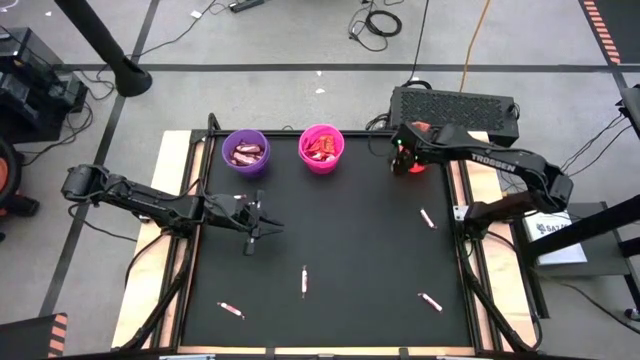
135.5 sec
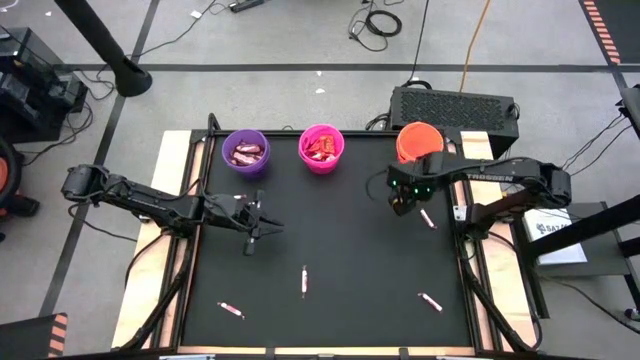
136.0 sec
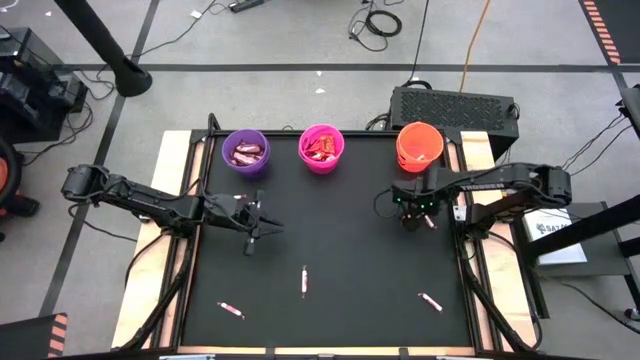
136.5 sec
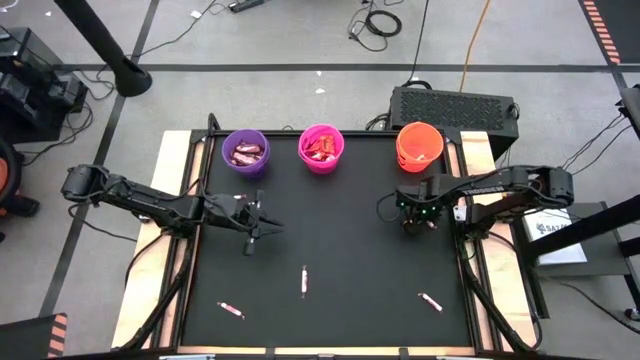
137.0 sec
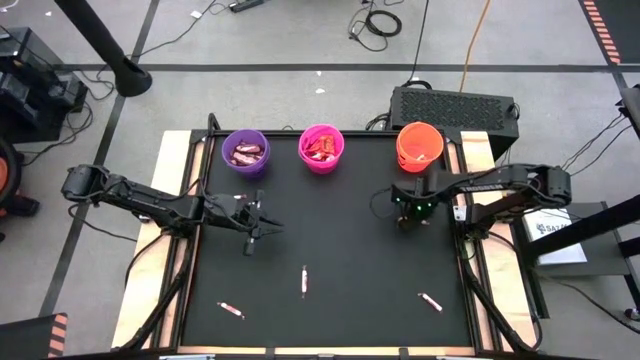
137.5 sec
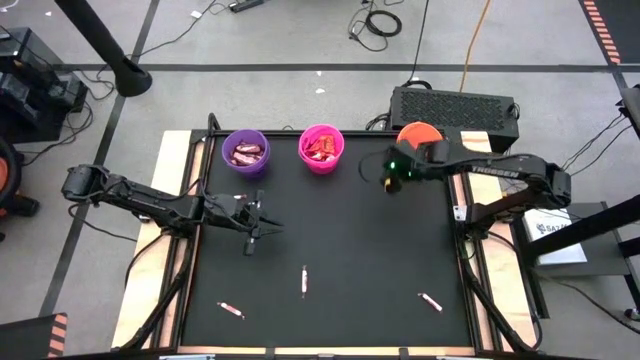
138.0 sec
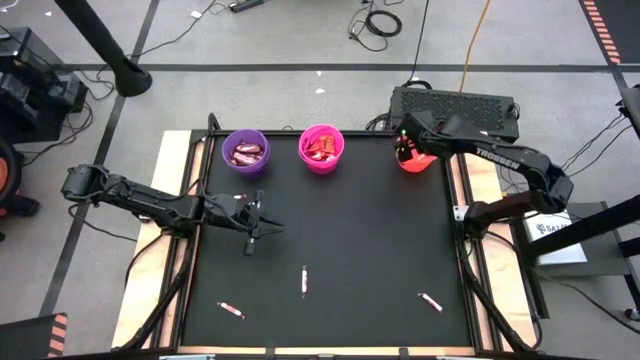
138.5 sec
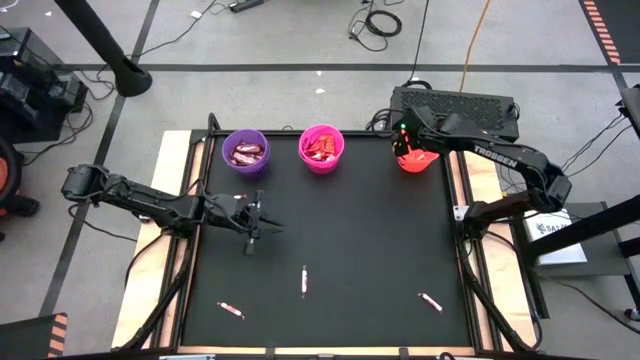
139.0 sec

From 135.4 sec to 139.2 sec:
Task: Sort candy by brand, put in halloween buckets
Put the white candy into the orange bucket

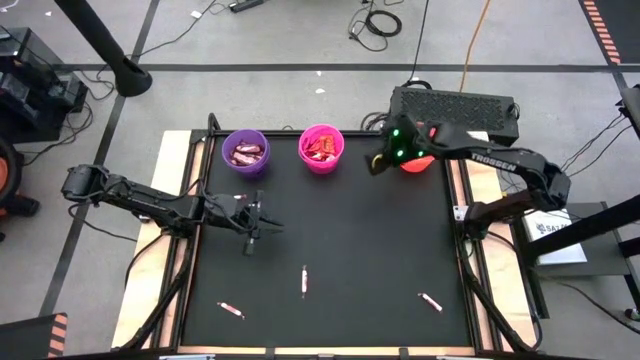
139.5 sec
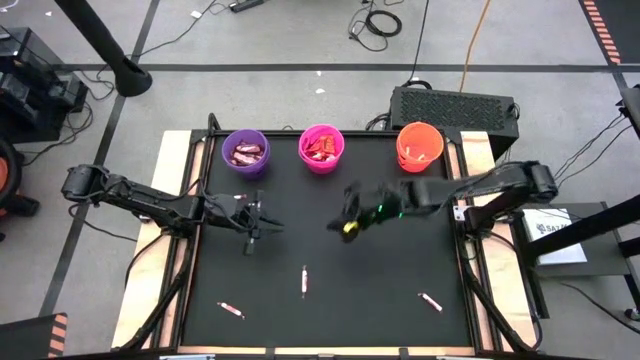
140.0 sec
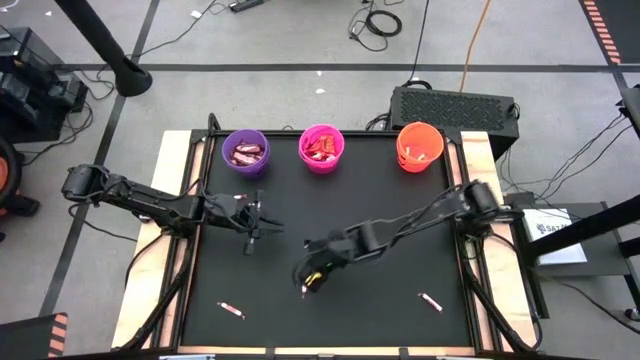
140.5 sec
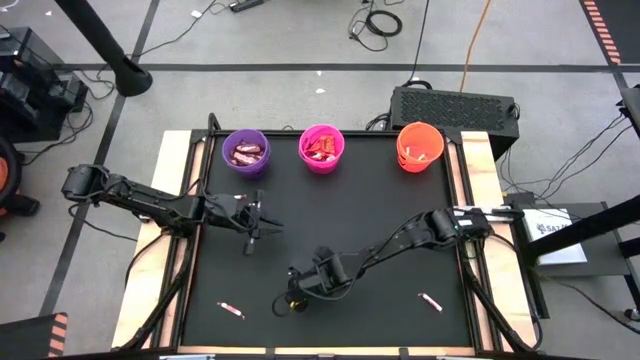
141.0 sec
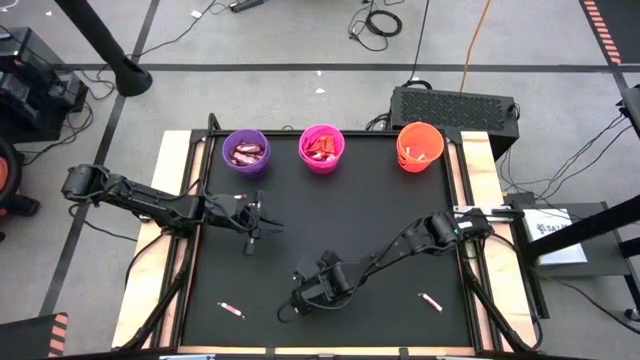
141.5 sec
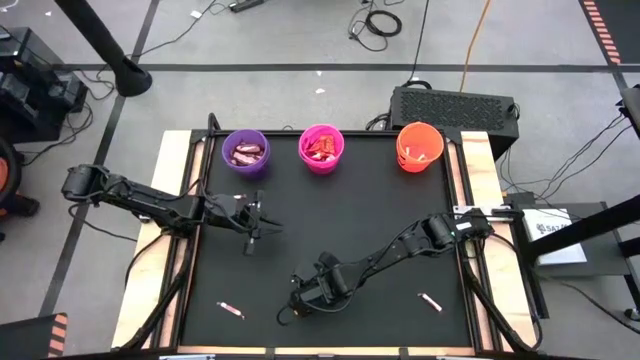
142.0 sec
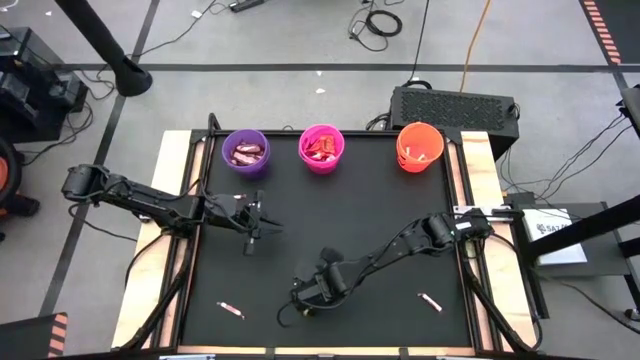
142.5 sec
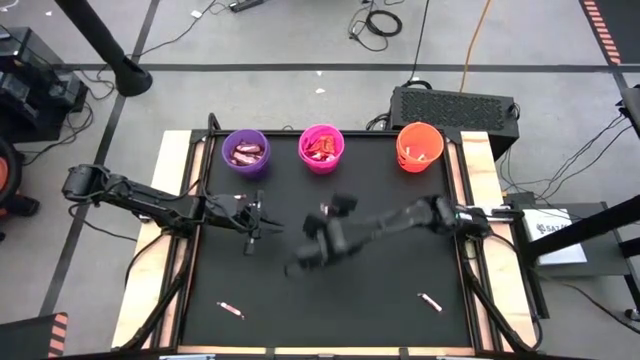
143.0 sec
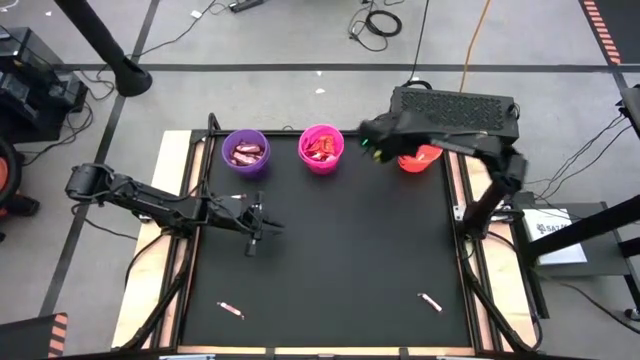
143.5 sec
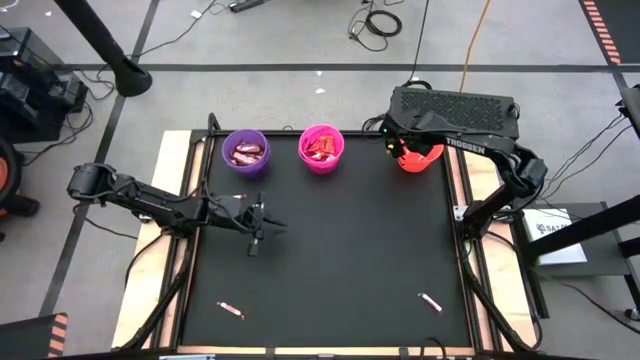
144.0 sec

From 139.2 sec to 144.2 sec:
Put the white candy into the orange bucket

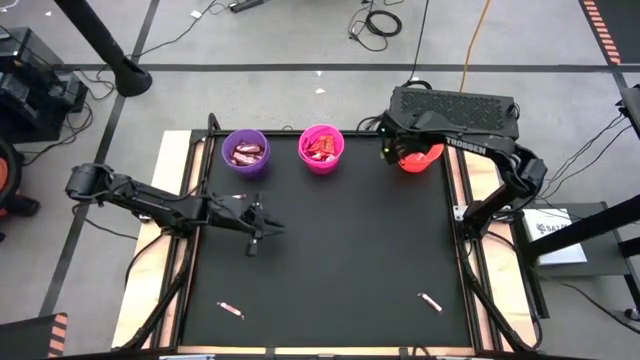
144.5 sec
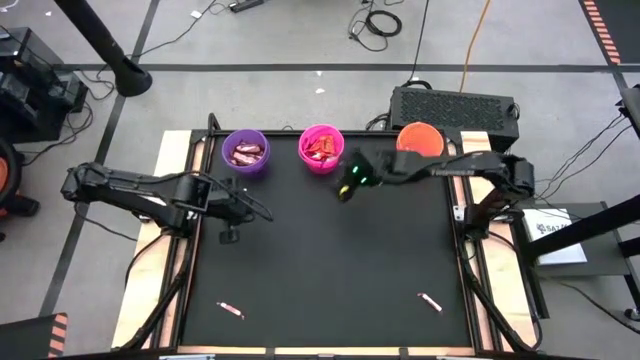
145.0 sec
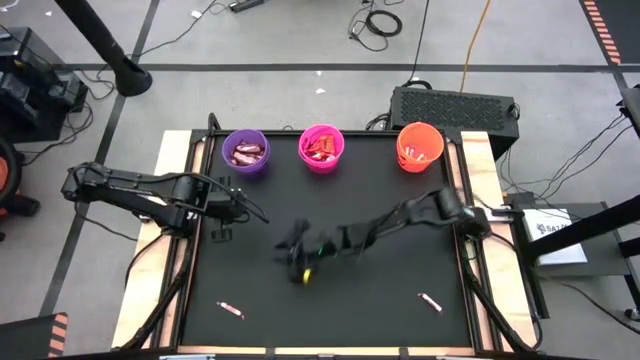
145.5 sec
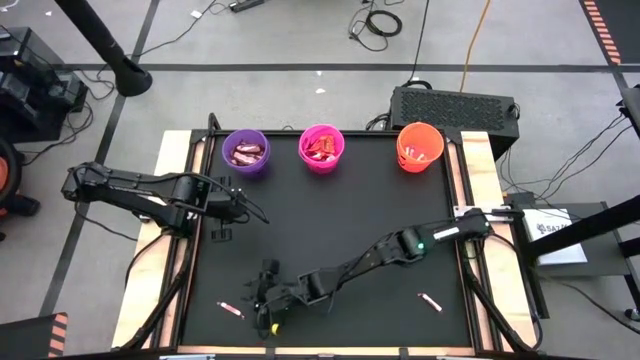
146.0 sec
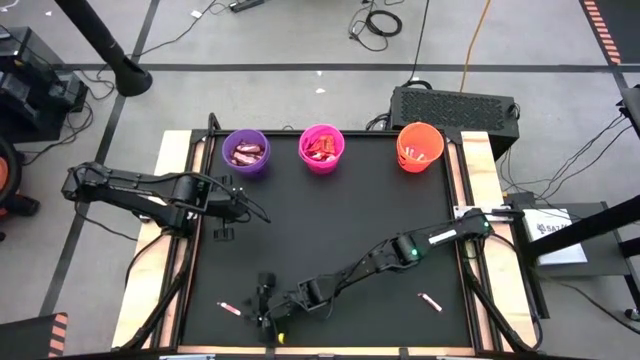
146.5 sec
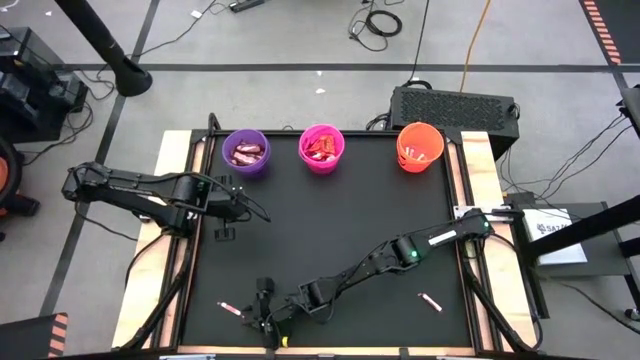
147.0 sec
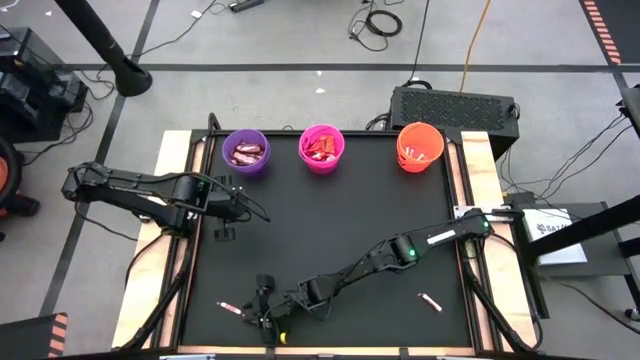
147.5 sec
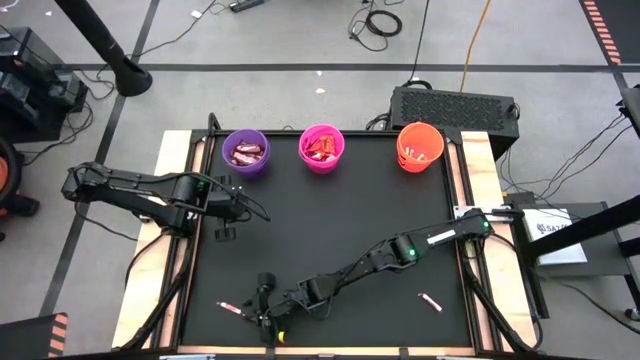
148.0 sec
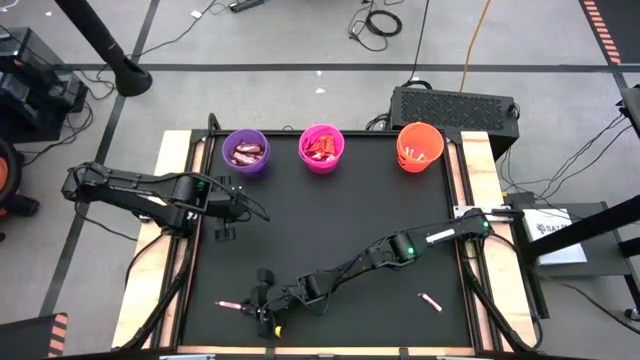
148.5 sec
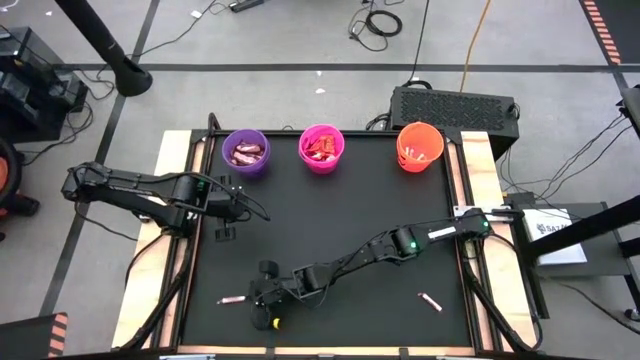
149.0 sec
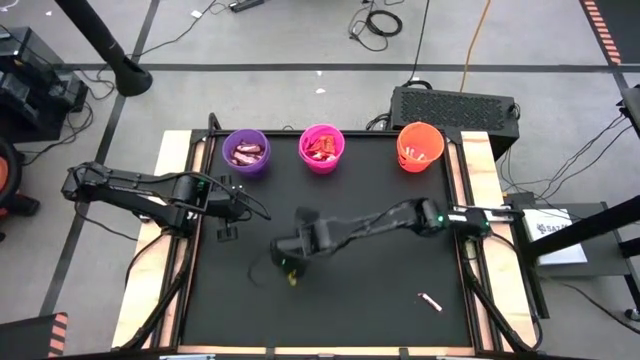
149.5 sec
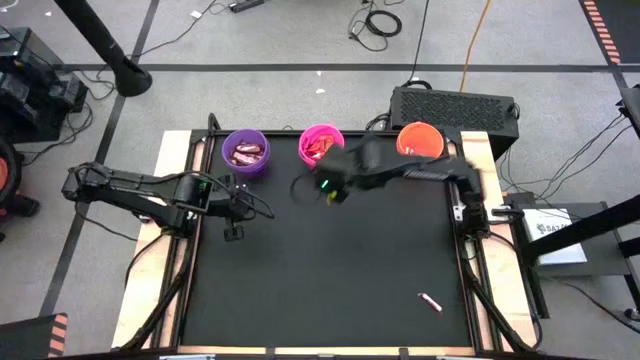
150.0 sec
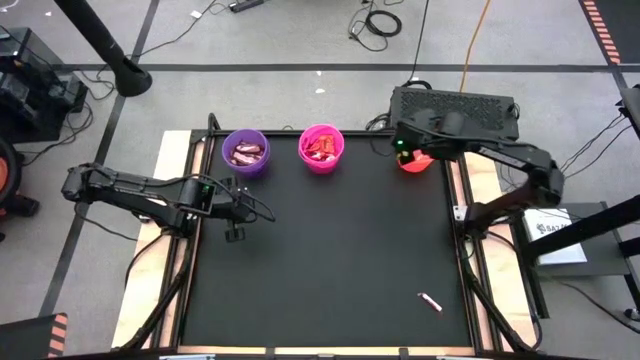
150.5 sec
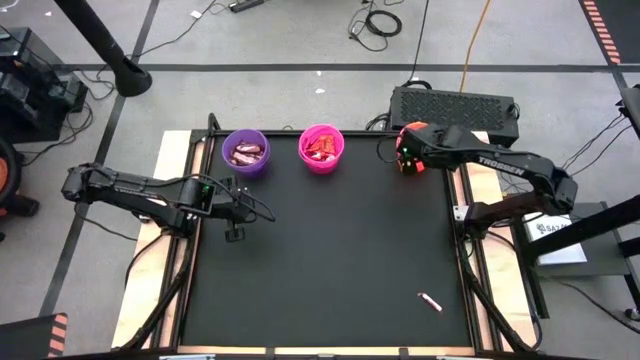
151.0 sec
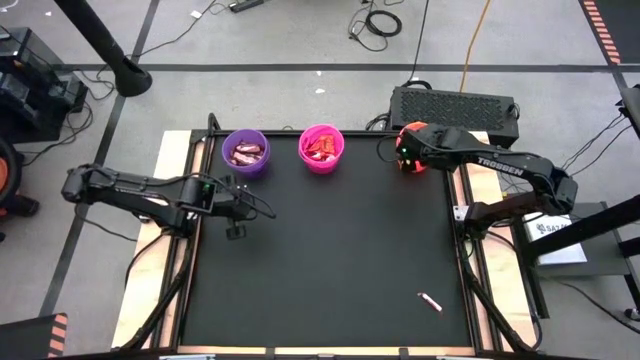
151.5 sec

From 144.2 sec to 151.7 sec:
Put the white candy into the orange bucket

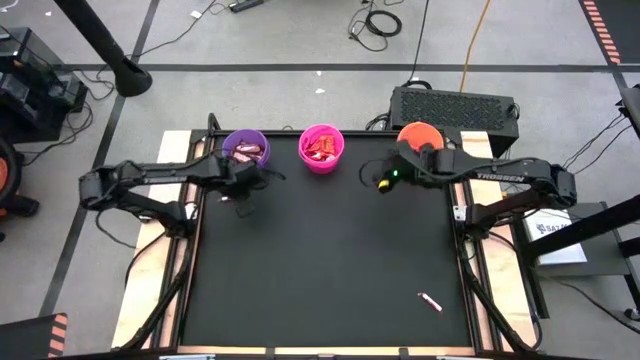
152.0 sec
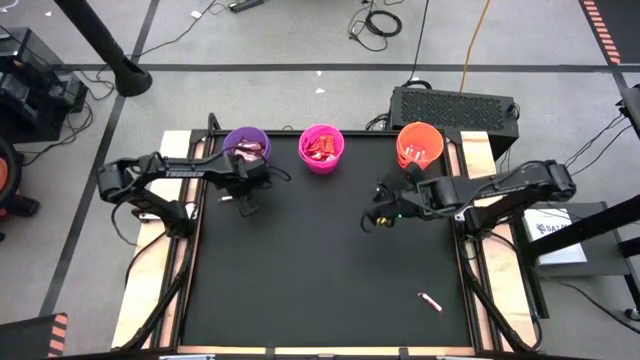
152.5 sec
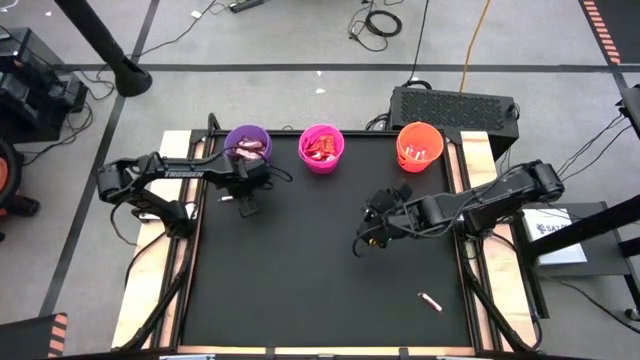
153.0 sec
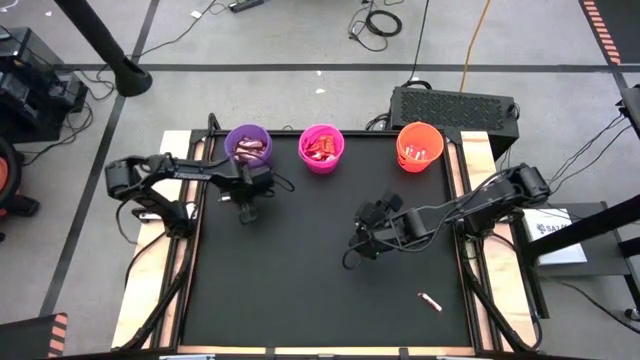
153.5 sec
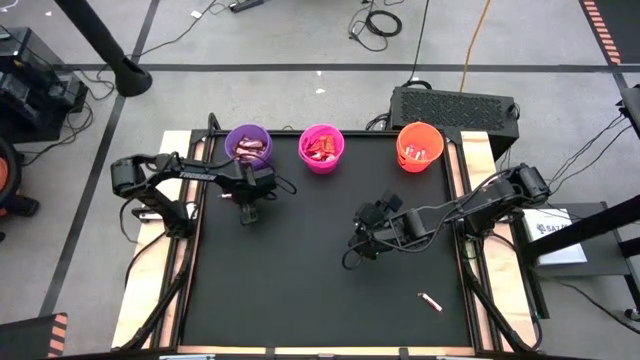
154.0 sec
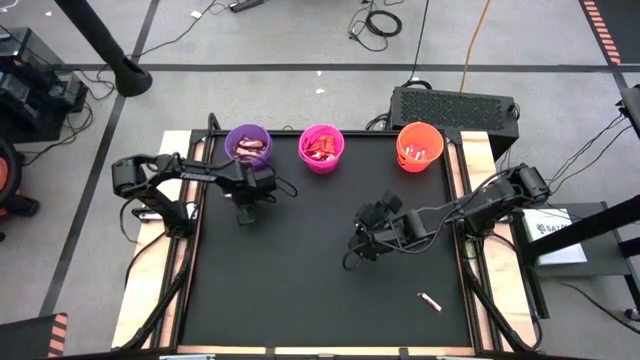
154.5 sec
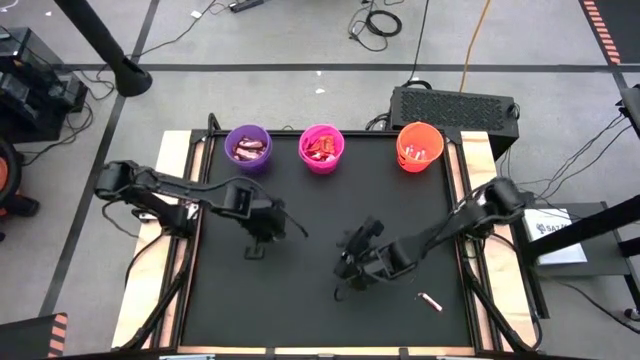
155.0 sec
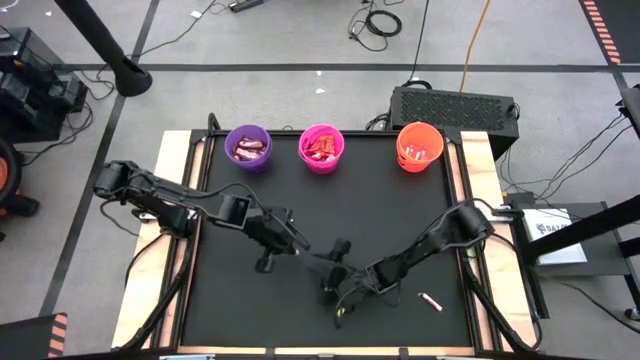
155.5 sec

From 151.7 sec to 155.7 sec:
Put the white candy into the orange bucket

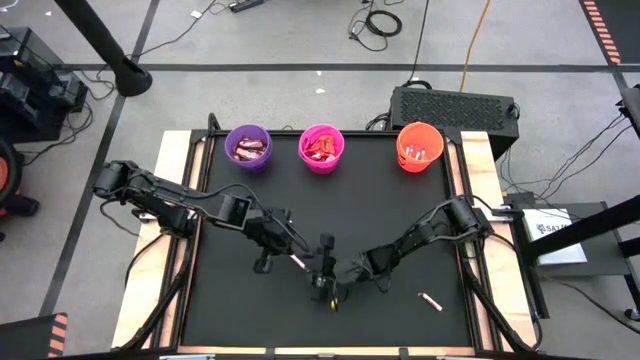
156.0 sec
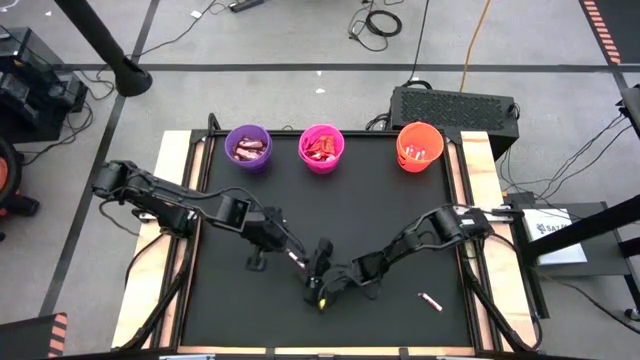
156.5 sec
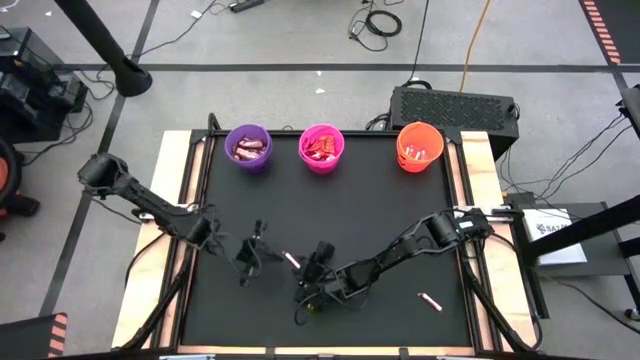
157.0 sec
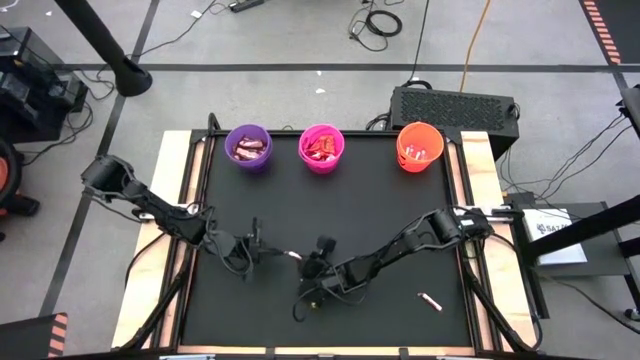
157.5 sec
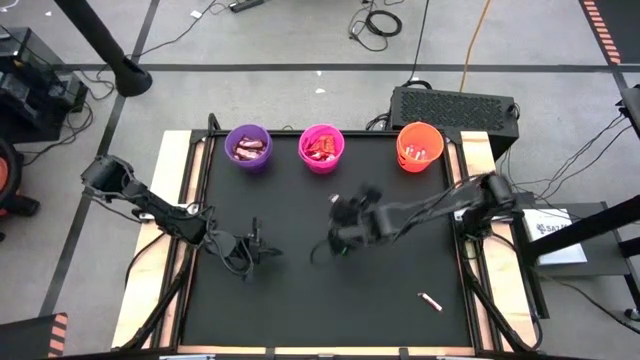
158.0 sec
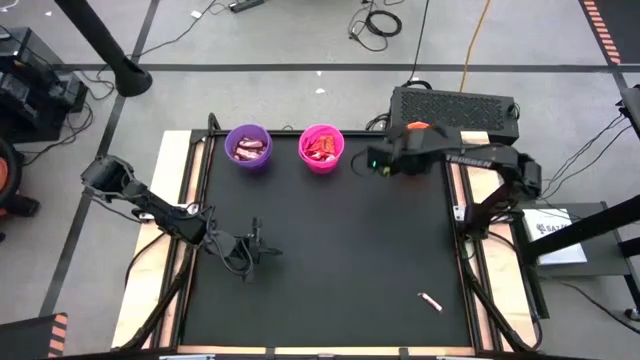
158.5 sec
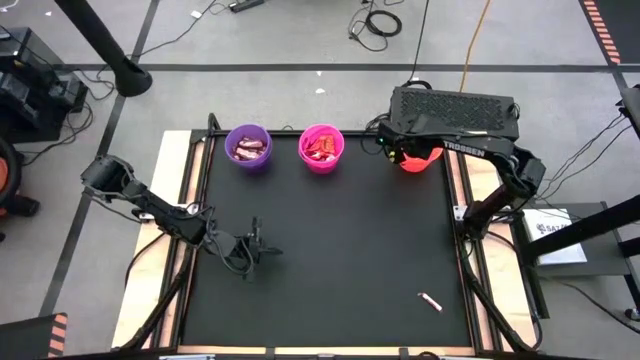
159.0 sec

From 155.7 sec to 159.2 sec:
Put the white candy into the orange bucket
